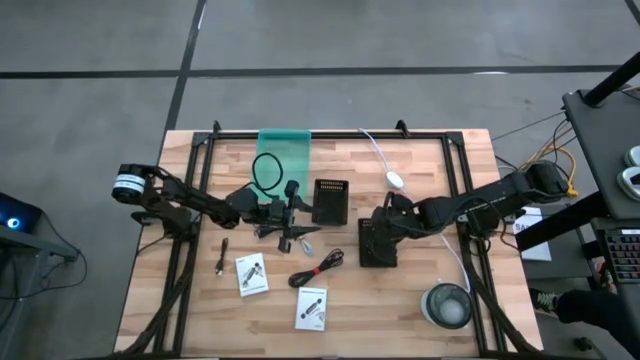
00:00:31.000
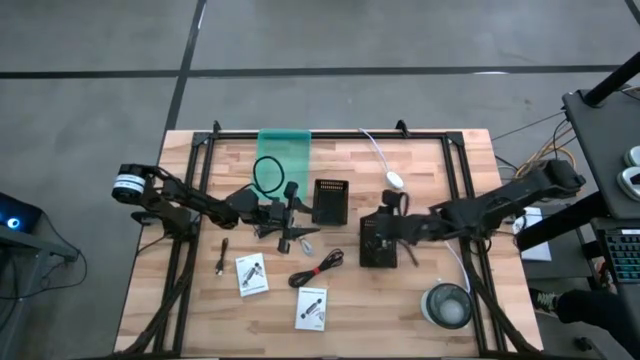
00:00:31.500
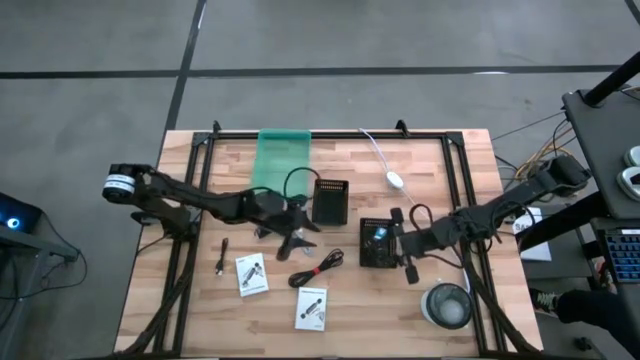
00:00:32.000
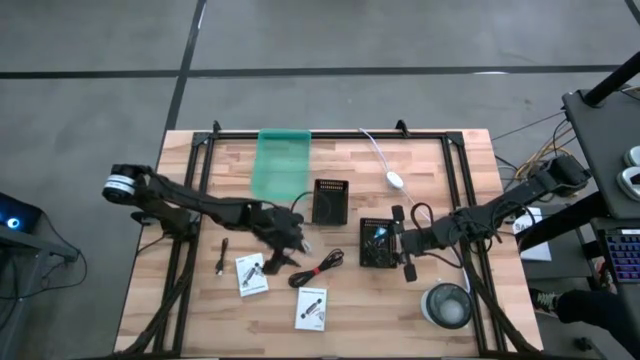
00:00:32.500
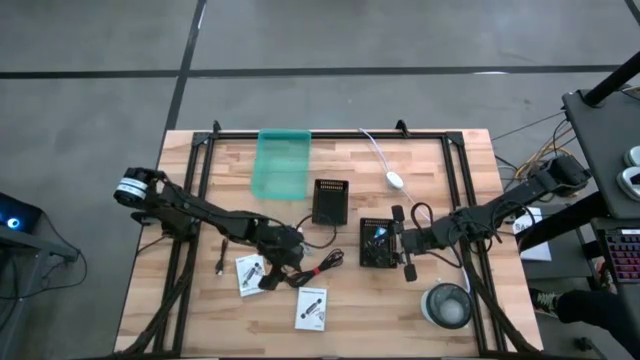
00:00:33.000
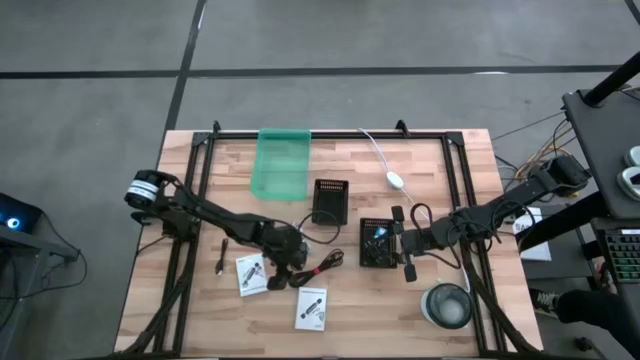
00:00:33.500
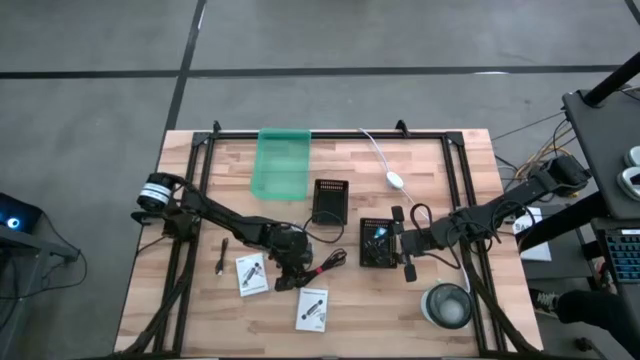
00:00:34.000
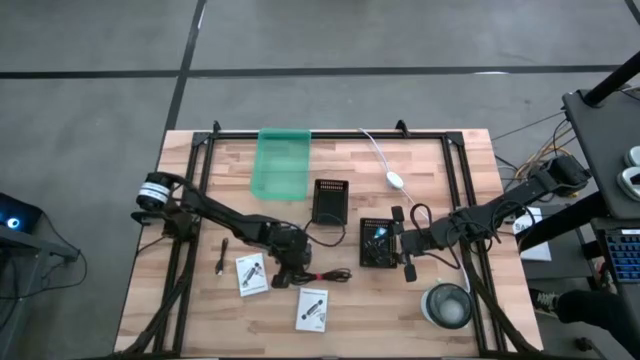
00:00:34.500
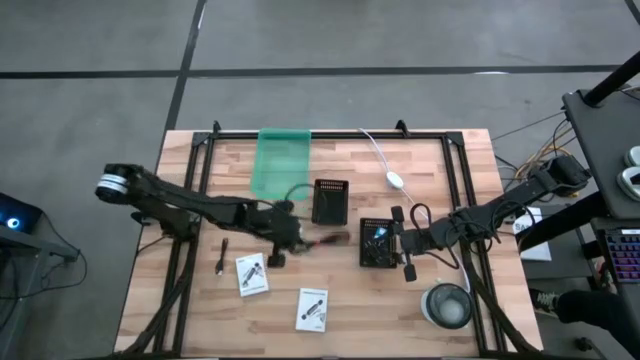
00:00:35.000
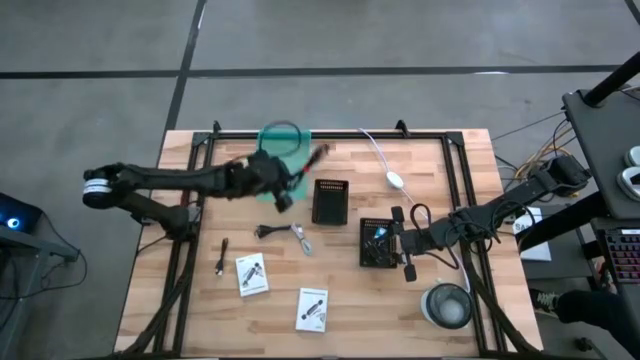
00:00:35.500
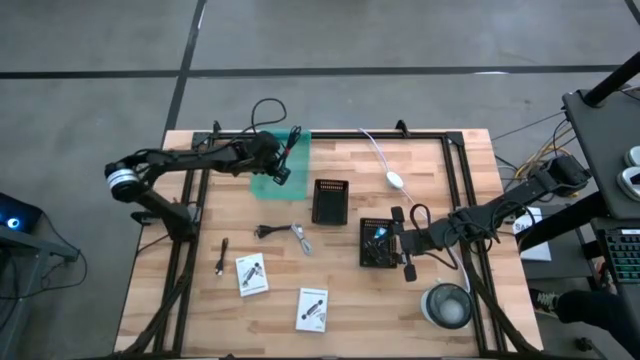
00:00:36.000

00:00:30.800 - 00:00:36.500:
Task: Pick and place items into bin
Put the bottom right black USB cable into the green bin

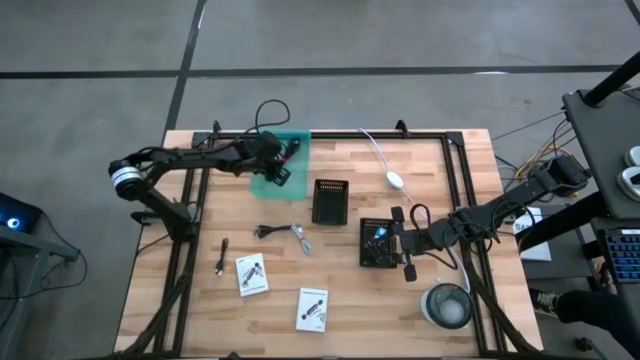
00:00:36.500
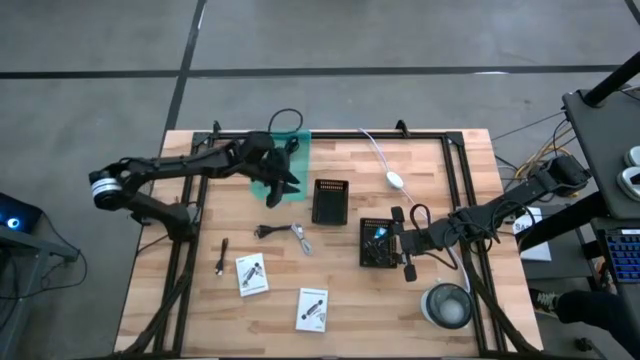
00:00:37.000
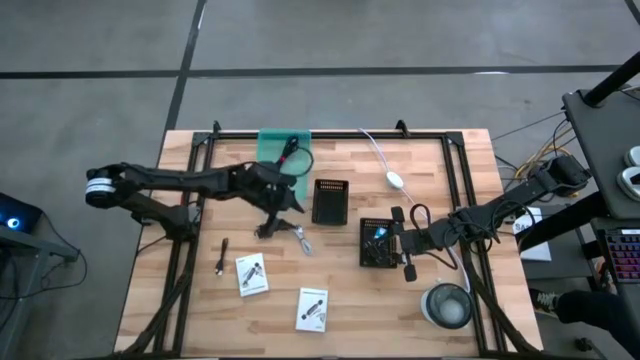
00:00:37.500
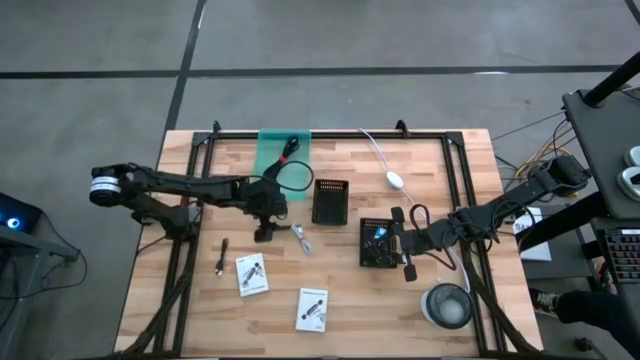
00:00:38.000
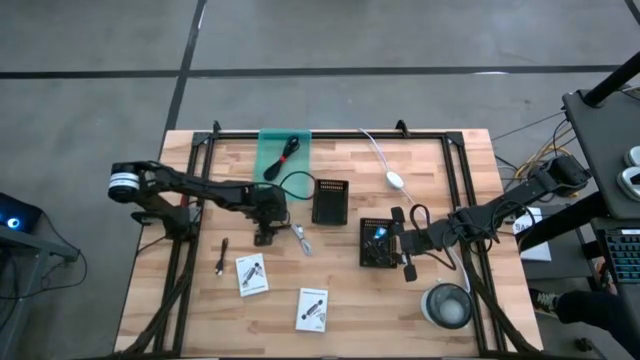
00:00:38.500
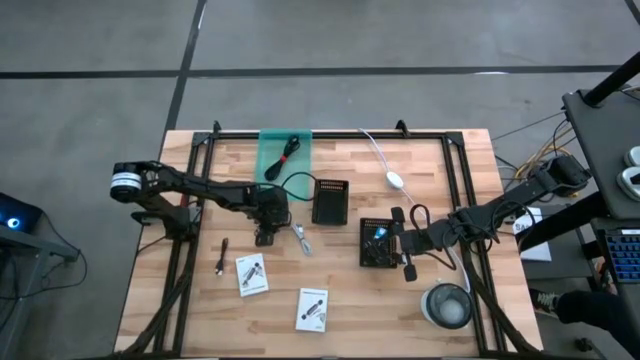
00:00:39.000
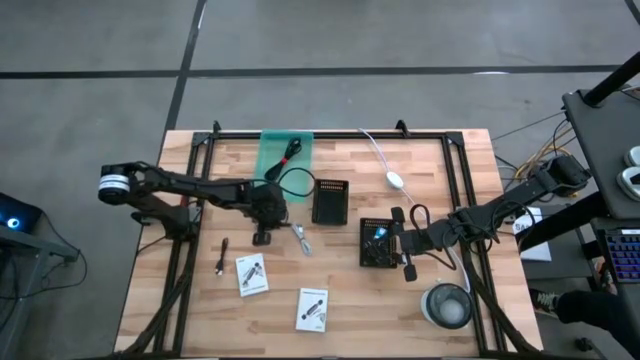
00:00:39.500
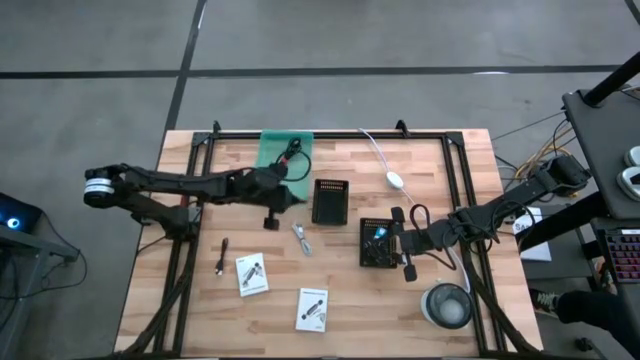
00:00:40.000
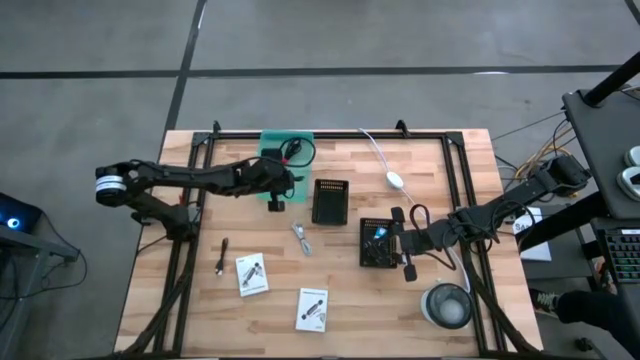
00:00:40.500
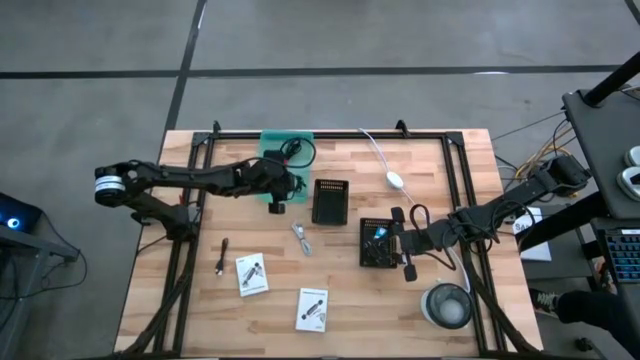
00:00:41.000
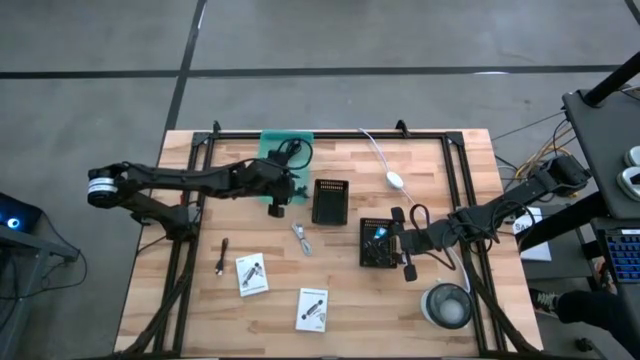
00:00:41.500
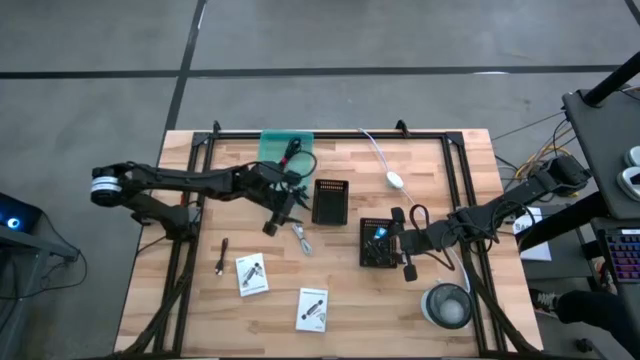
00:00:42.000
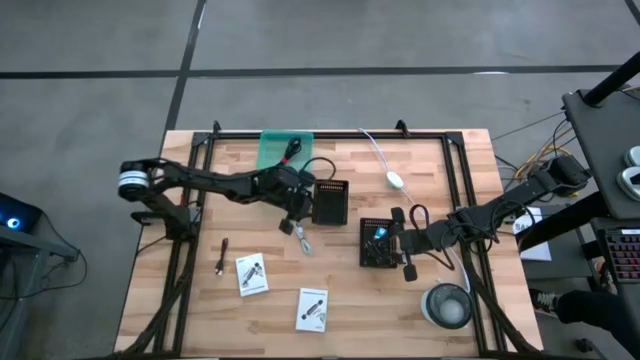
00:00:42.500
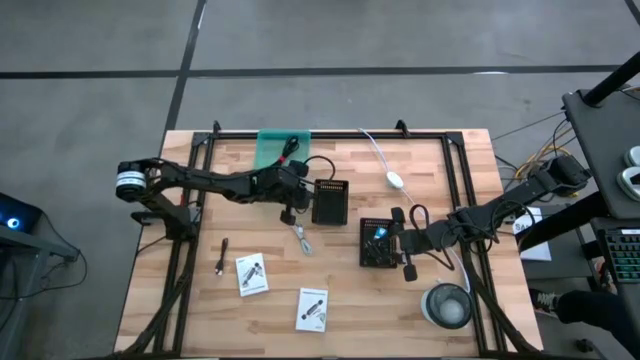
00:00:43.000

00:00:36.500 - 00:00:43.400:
Put the top black USB cable into the green bin

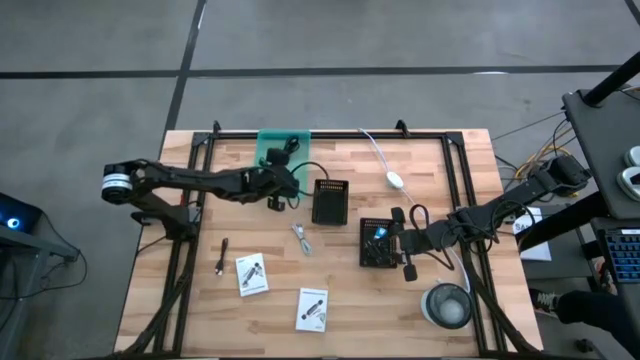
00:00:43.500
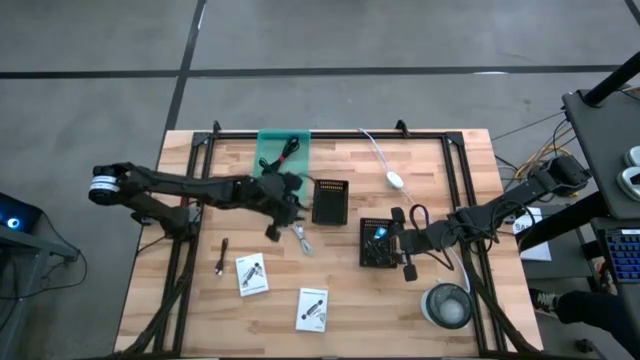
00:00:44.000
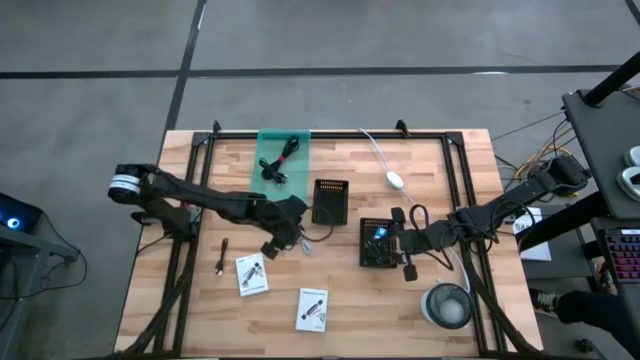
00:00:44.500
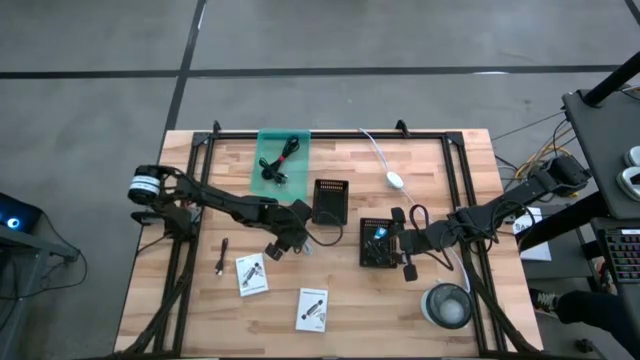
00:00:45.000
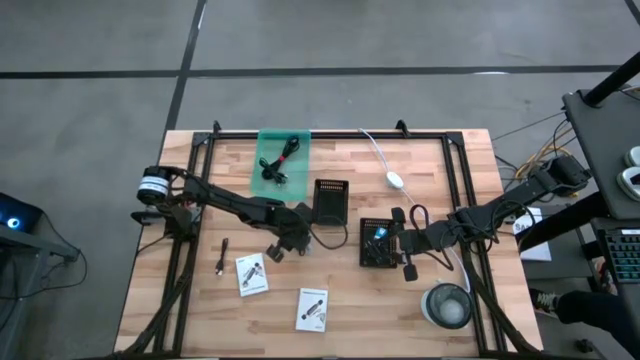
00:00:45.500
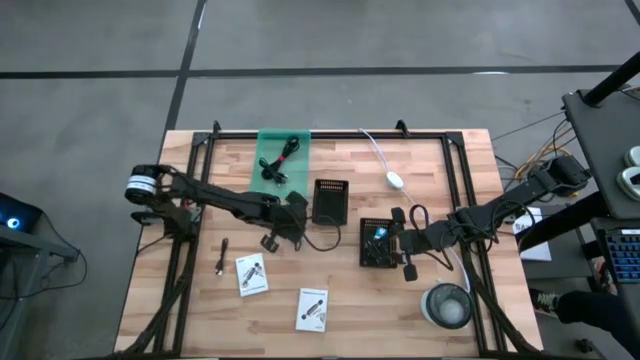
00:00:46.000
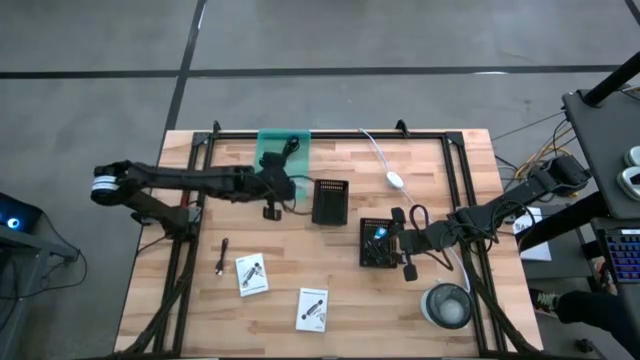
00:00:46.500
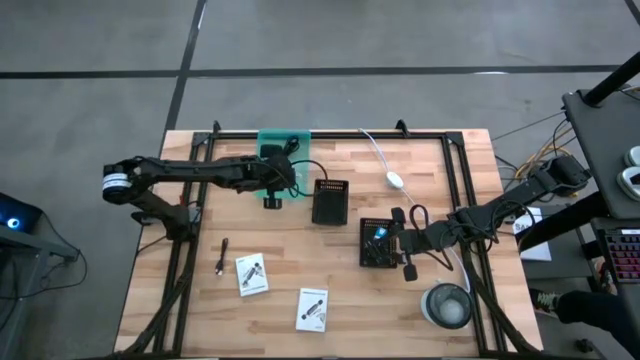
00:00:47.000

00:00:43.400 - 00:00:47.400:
Put the white USB cable into the green bin

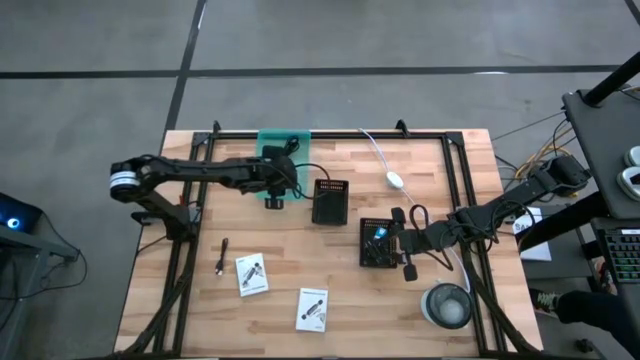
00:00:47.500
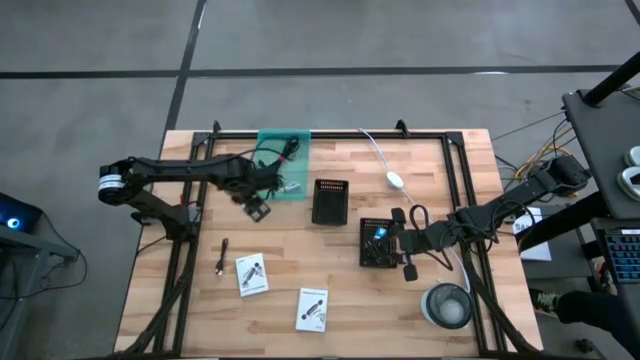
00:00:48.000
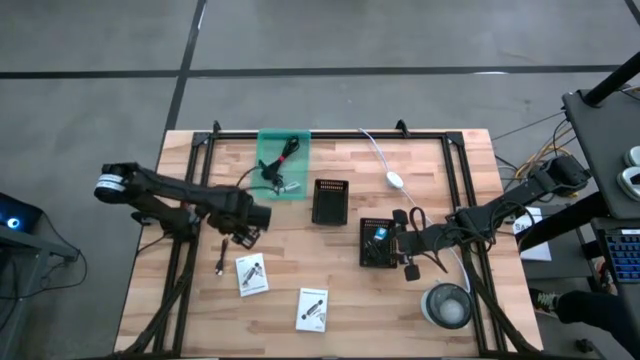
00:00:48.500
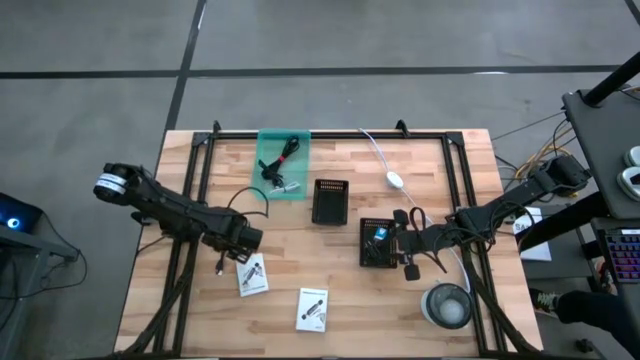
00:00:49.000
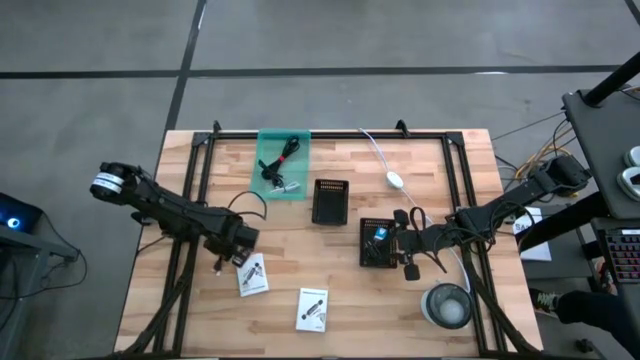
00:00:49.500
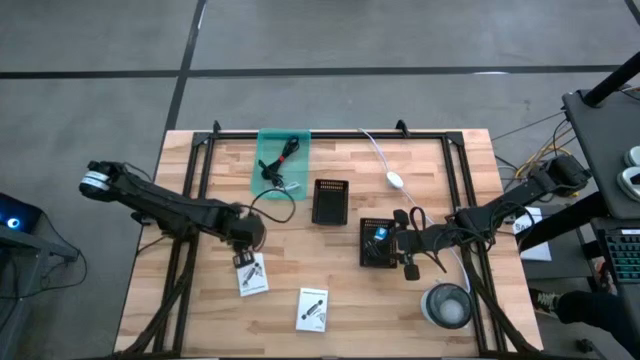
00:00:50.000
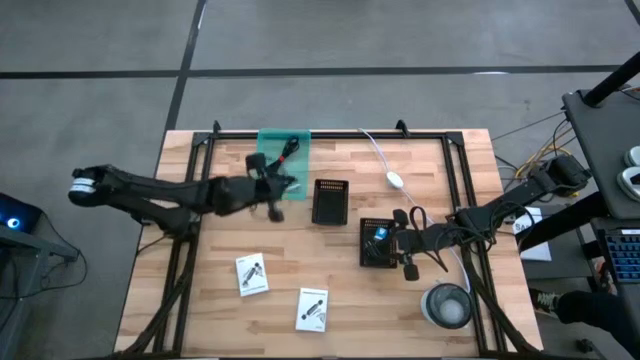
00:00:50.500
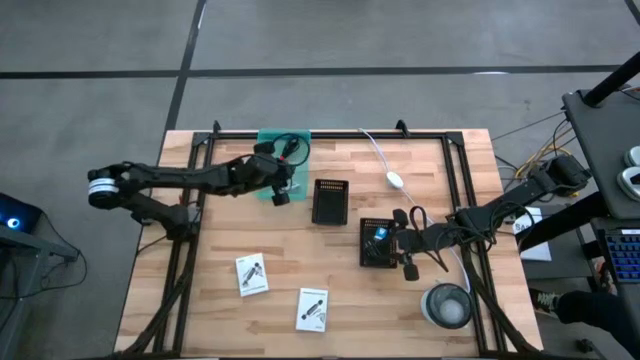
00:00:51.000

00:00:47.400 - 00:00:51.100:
Put the black USB cable into the green bin
